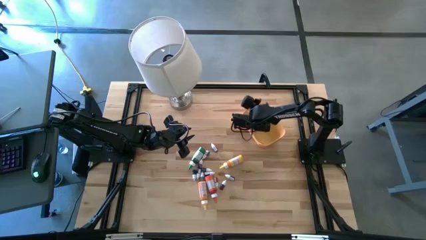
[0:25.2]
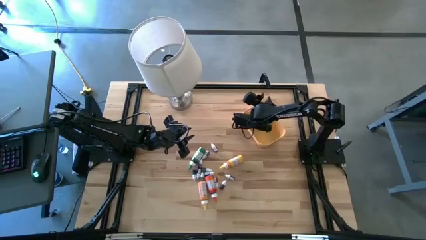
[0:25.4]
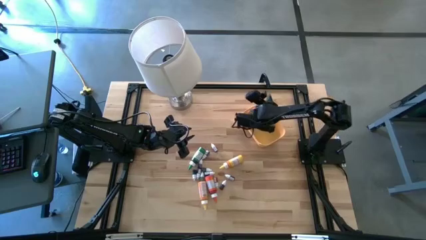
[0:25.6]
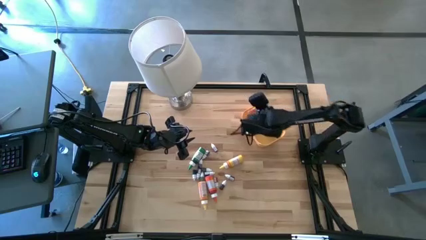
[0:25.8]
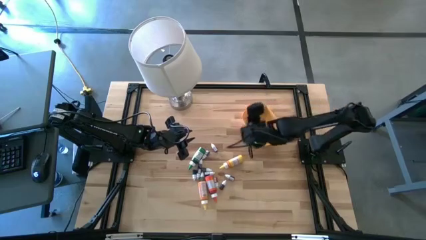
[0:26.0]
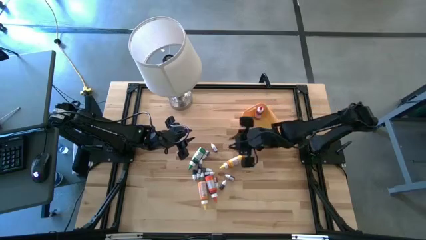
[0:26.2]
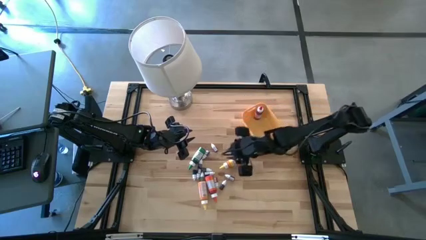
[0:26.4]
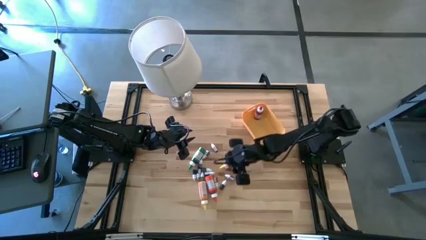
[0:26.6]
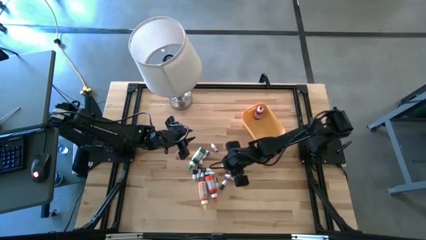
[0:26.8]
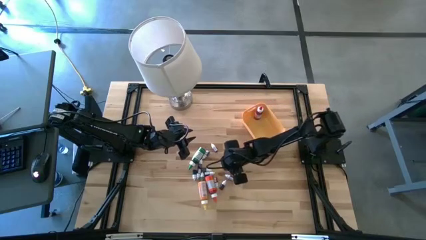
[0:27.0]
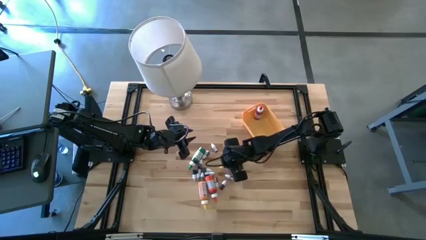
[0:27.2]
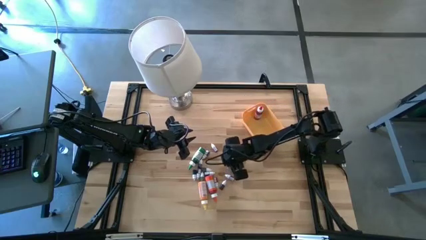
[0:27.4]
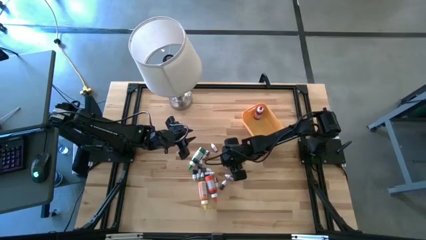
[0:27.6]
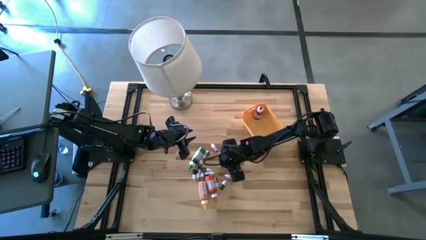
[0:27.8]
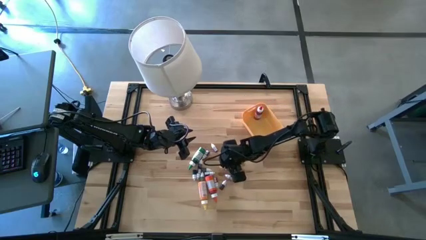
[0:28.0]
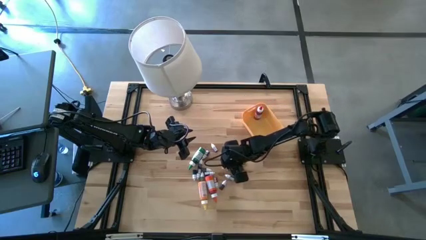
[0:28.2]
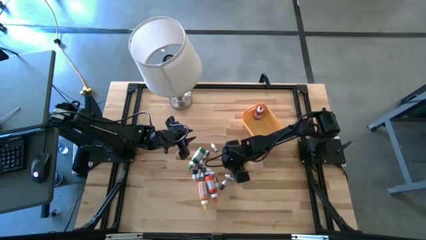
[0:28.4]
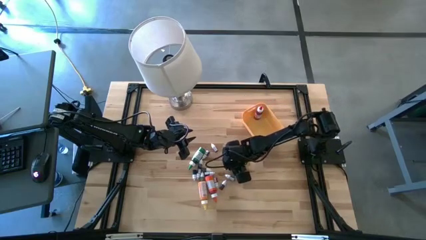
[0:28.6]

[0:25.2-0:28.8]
Task: Pick & Place food coloring
Put the large yellow food coloring bottle into the yellow bin

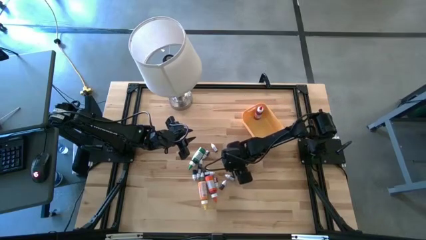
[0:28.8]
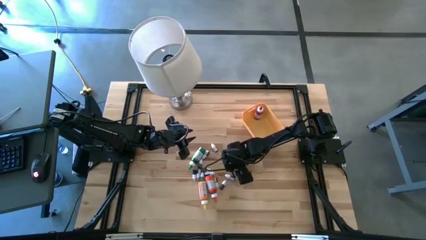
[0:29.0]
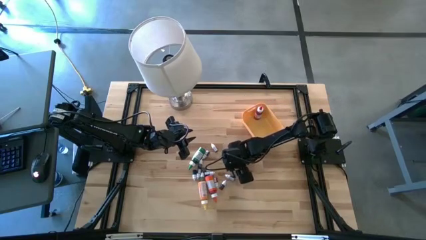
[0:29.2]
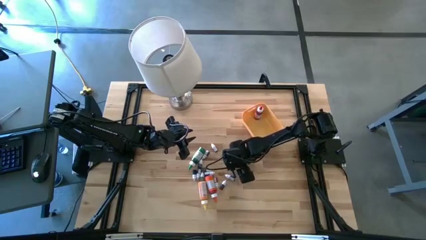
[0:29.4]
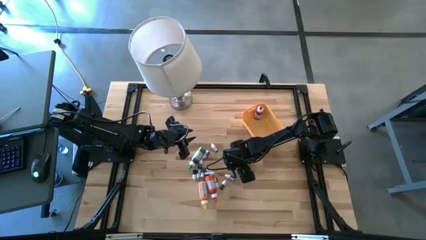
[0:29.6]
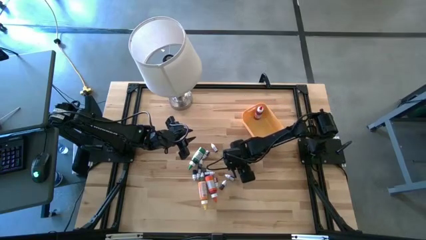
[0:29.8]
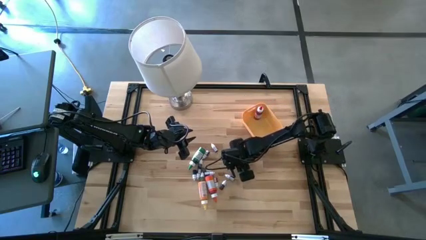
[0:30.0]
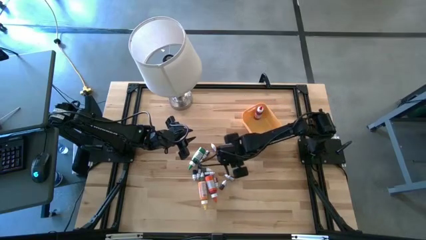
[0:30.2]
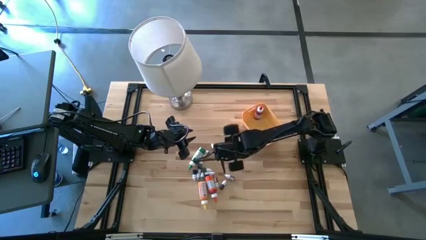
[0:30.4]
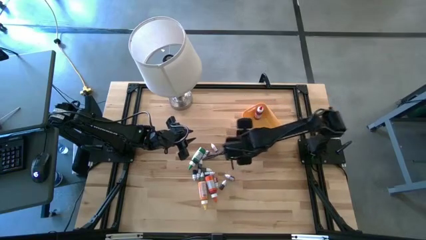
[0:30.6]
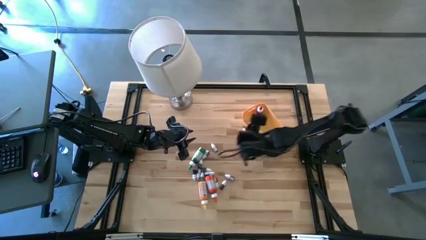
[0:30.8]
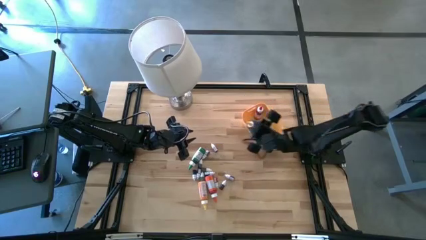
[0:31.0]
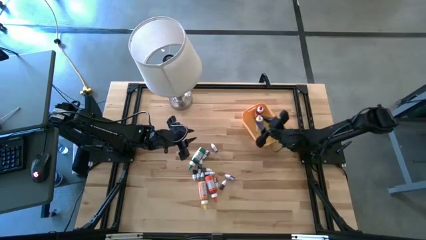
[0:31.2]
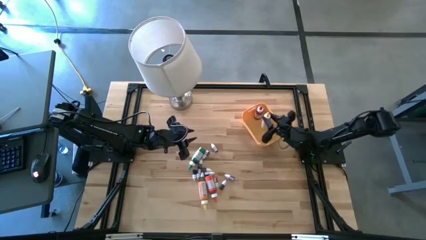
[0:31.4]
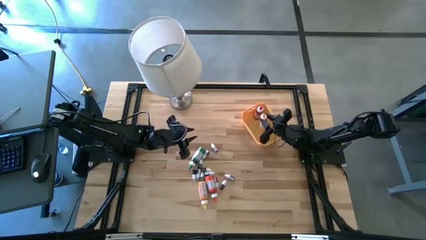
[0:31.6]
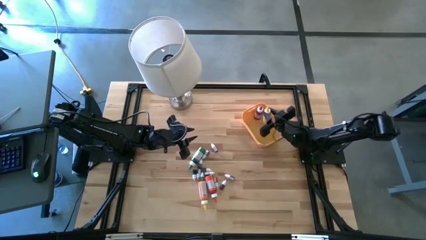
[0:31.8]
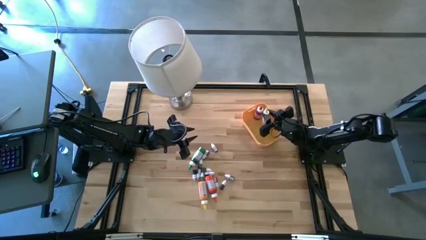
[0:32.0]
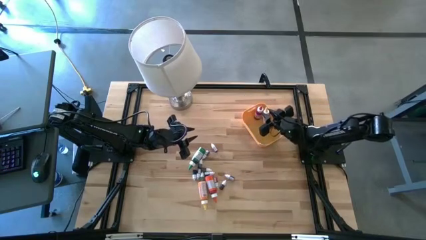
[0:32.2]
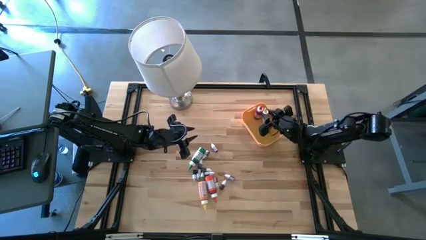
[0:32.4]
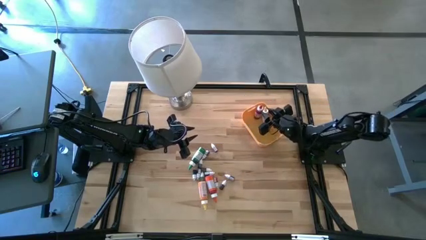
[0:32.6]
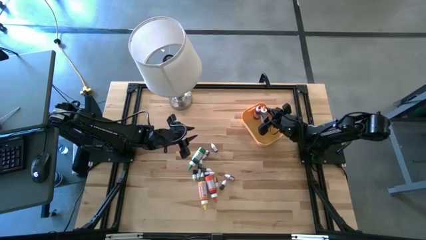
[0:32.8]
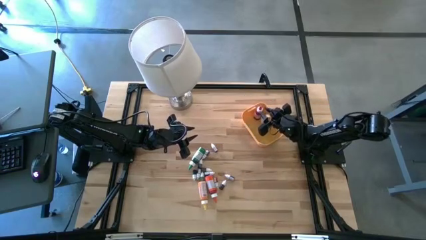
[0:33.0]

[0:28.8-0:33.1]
Put the large yellow food coloring bottle into the yellow bin

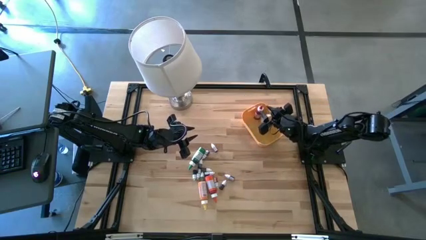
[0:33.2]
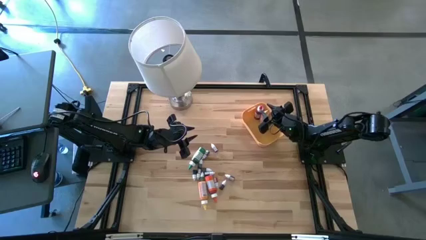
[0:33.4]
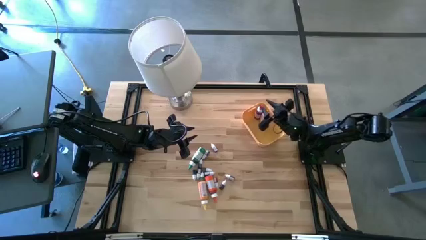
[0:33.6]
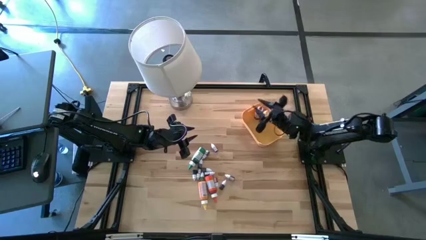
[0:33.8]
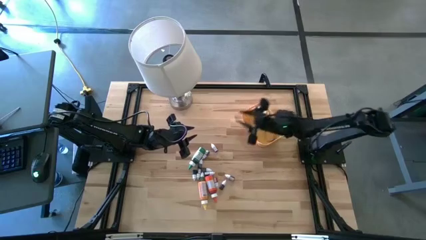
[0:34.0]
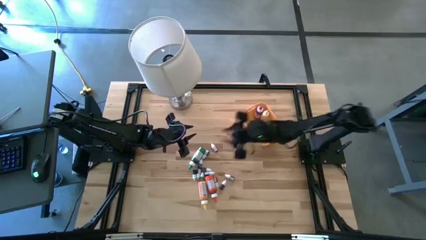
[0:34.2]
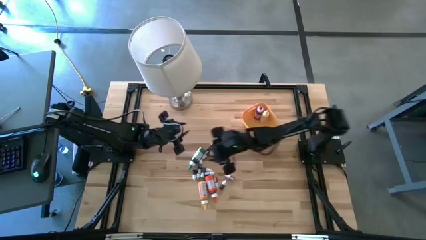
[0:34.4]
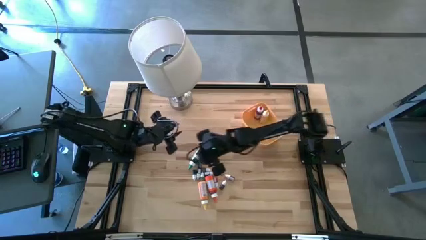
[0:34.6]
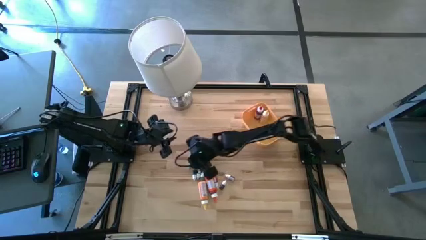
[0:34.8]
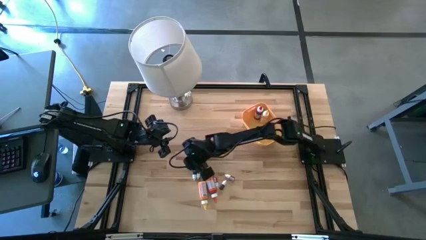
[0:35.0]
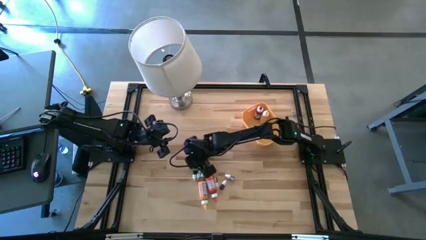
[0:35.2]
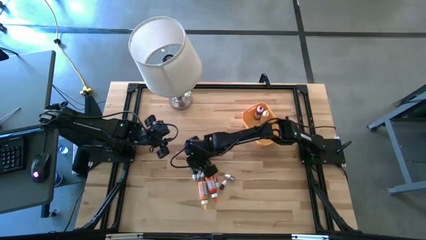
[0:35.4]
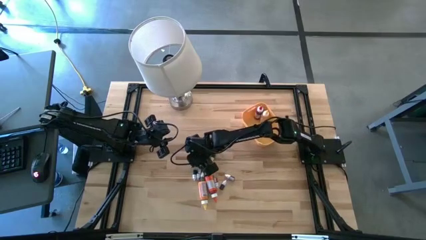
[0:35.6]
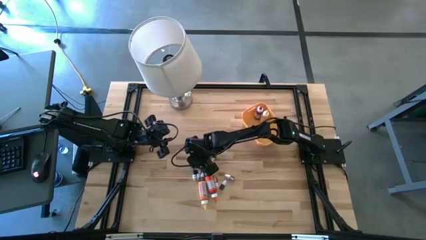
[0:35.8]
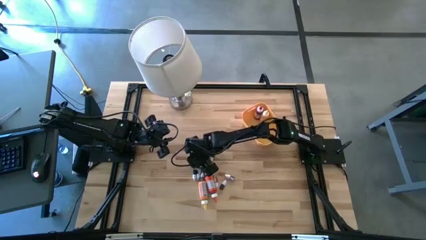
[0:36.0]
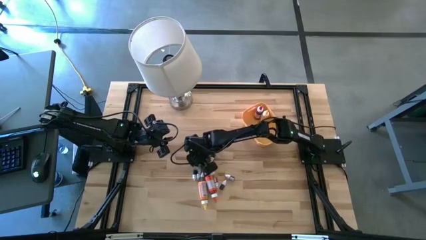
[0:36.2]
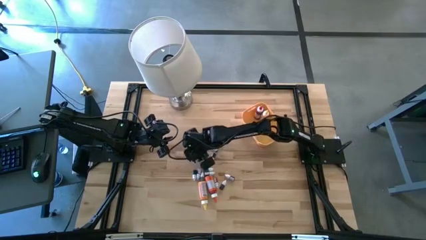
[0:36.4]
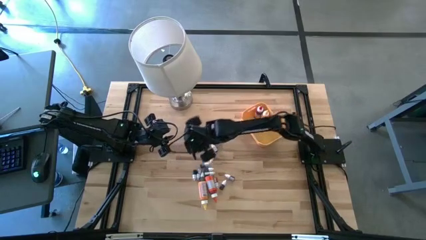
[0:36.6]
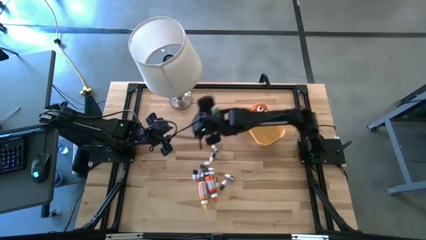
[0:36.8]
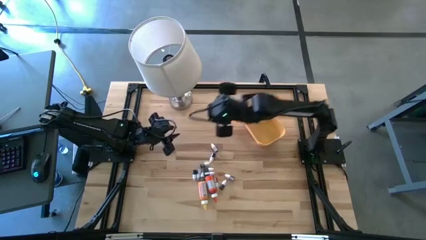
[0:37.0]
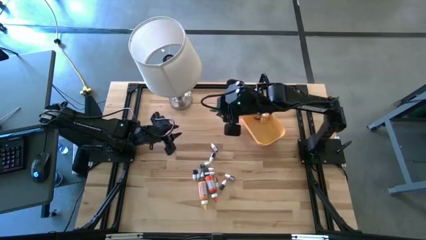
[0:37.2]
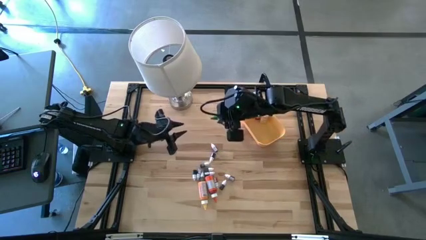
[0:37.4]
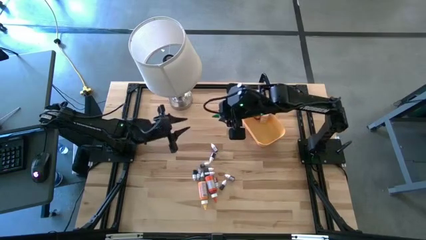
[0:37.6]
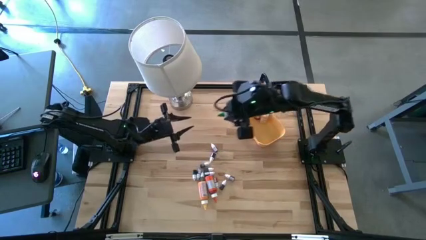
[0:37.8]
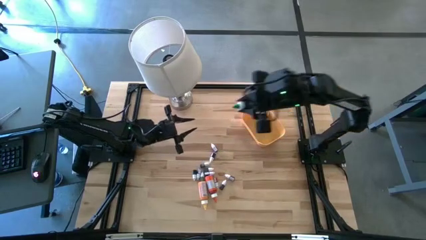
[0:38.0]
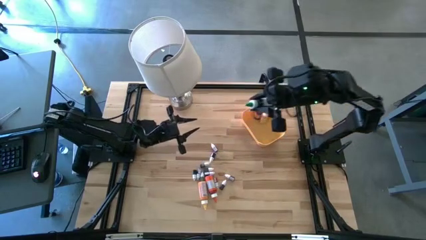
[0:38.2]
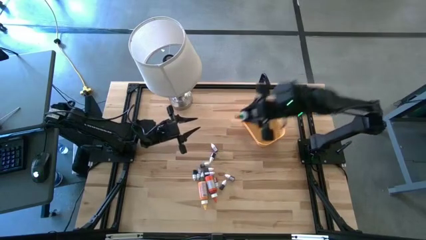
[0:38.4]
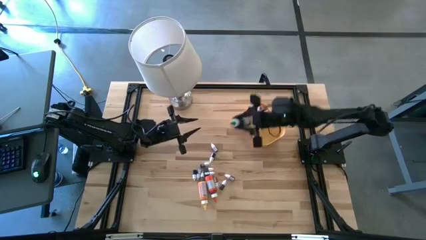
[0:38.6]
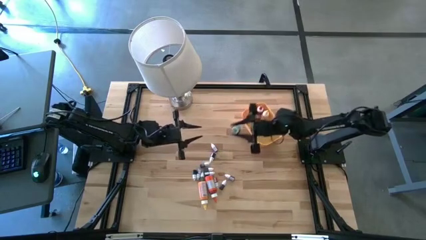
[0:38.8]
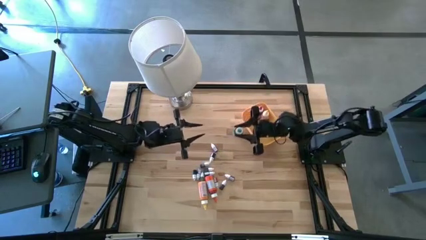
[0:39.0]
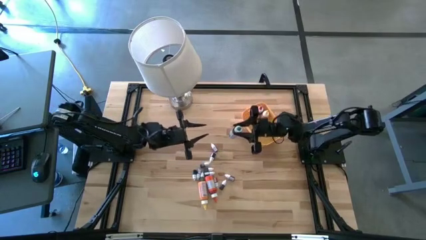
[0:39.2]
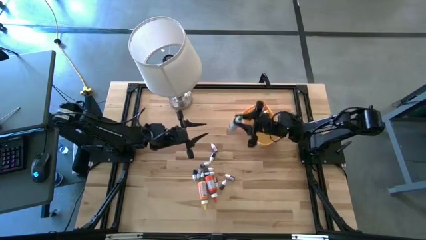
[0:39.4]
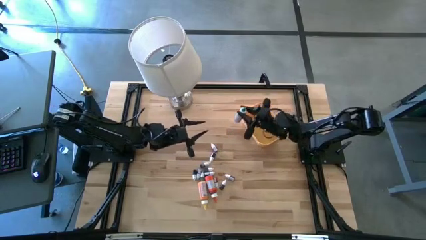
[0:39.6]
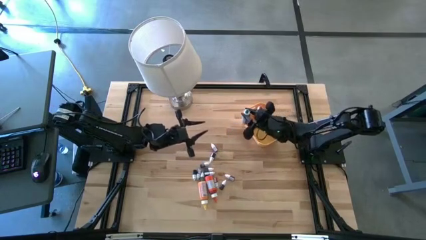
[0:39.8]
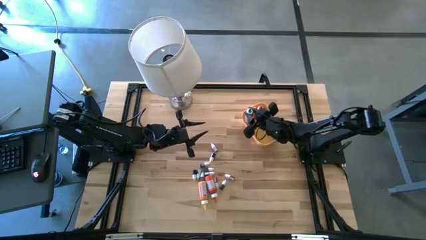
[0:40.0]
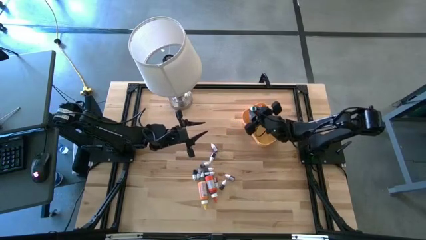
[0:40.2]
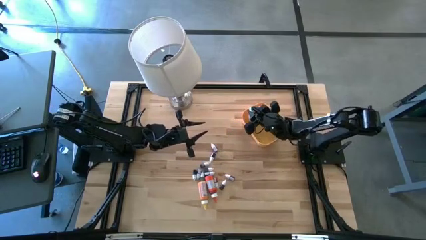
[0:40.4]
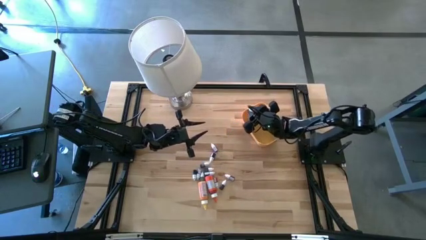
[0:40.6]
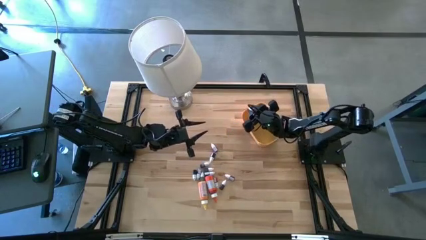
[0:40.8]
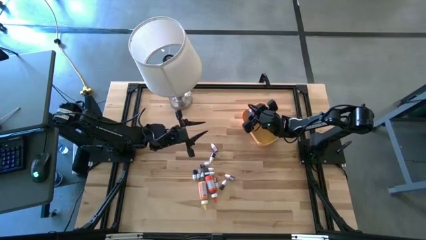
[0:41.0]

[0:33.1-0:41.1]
Put the large green food coloring bottle into the yellow bin
